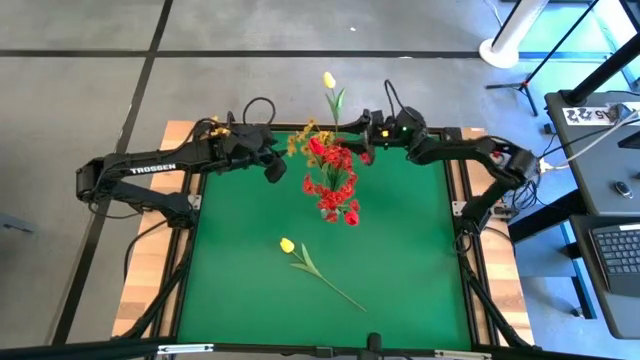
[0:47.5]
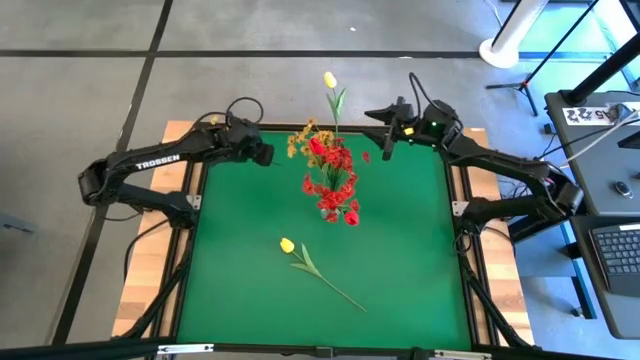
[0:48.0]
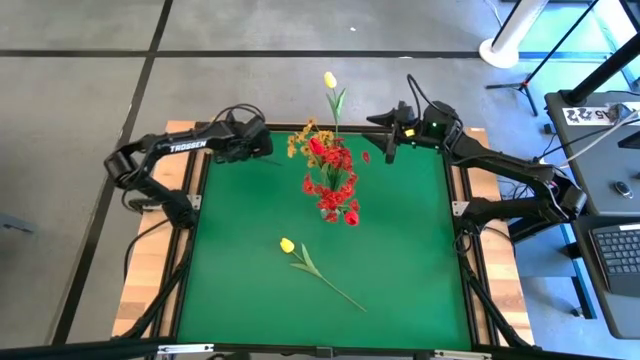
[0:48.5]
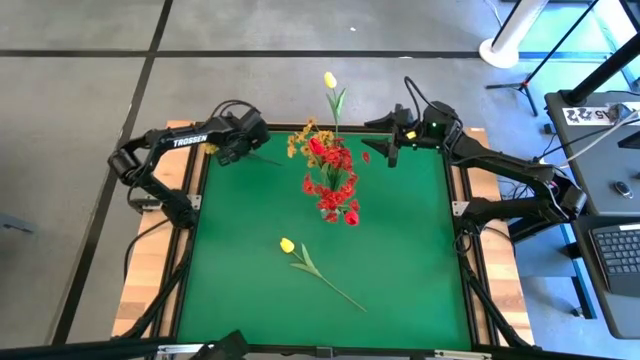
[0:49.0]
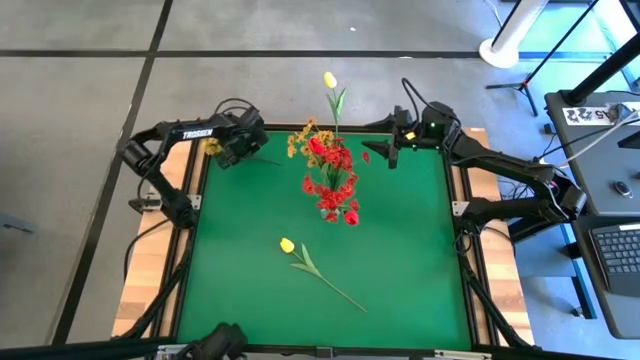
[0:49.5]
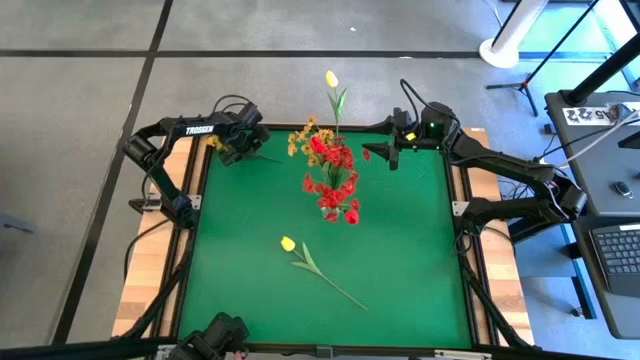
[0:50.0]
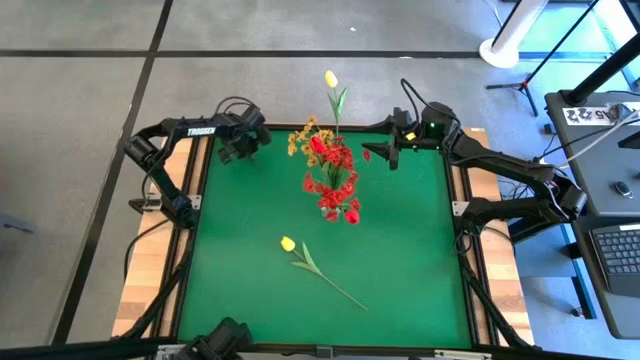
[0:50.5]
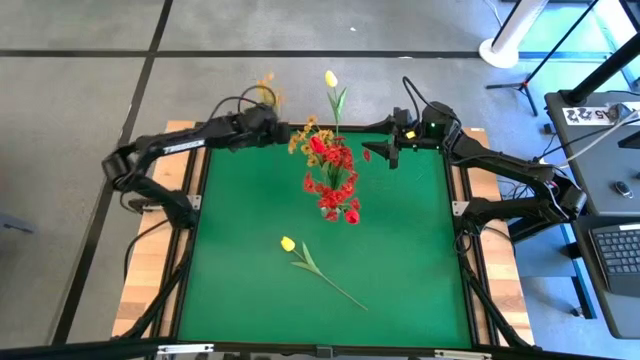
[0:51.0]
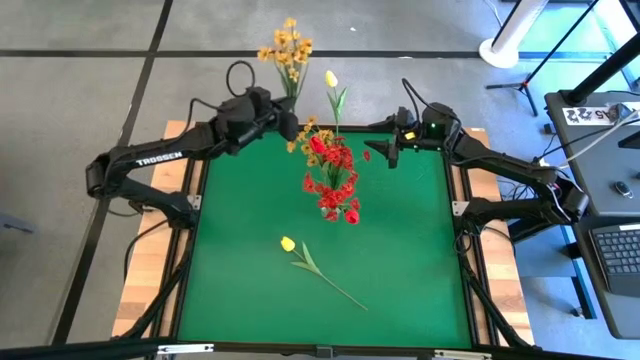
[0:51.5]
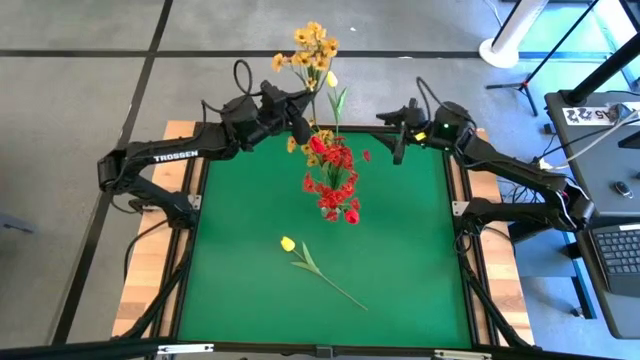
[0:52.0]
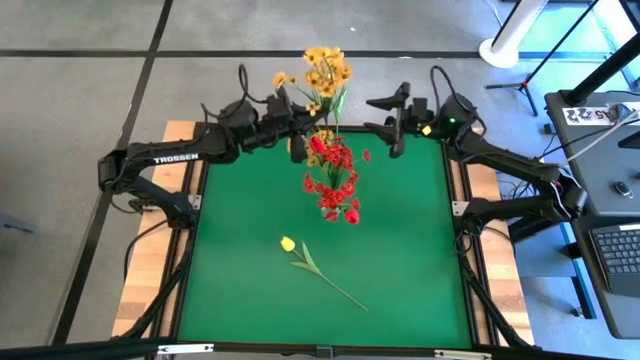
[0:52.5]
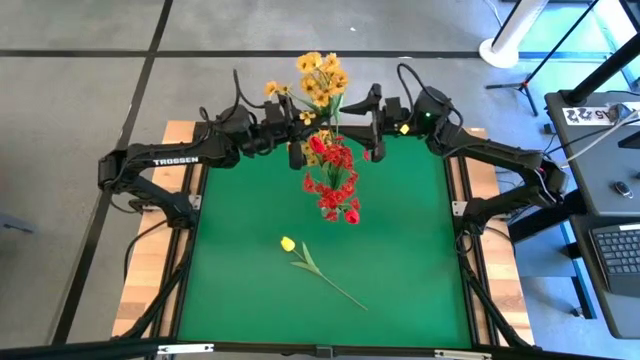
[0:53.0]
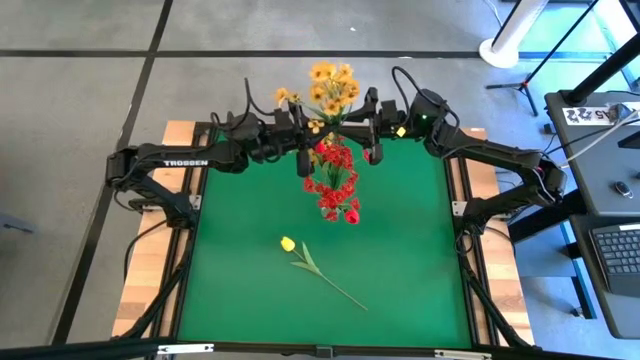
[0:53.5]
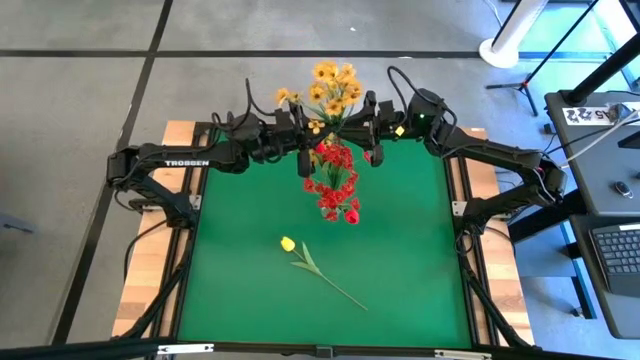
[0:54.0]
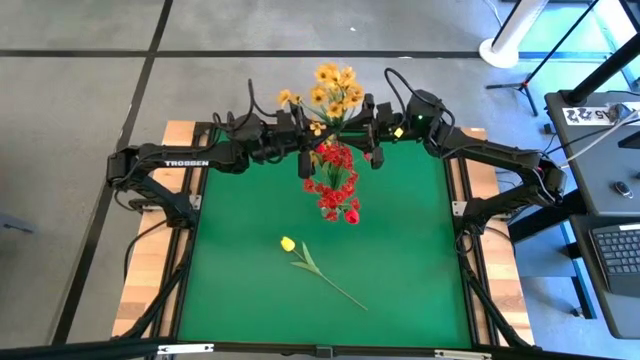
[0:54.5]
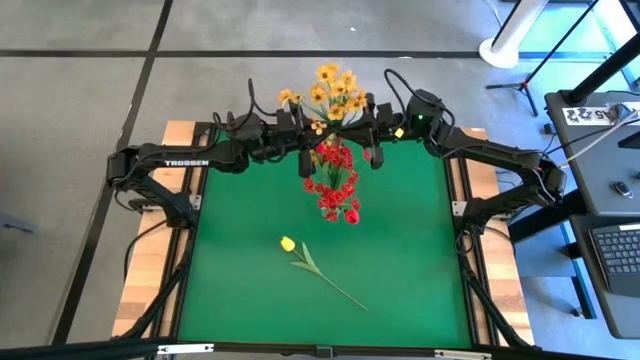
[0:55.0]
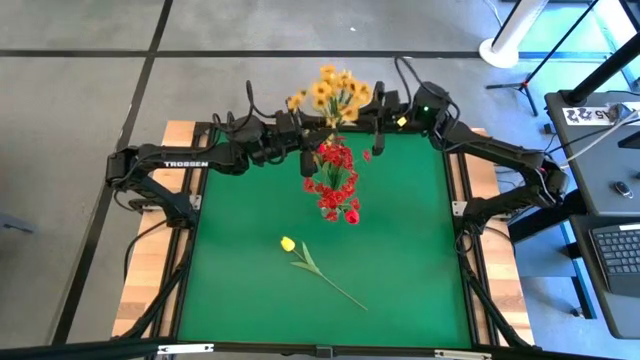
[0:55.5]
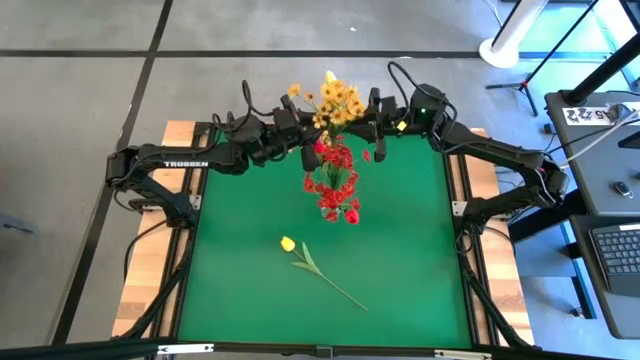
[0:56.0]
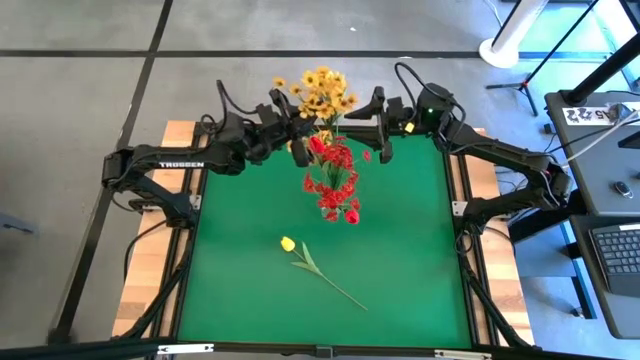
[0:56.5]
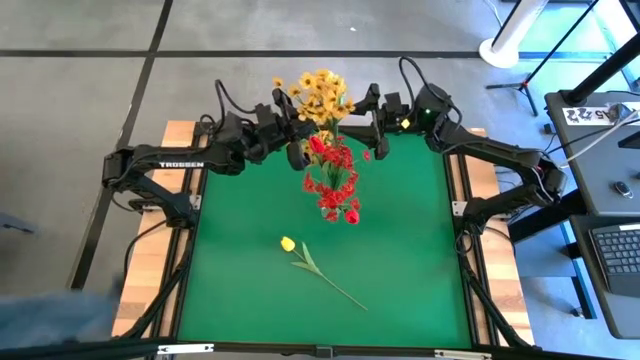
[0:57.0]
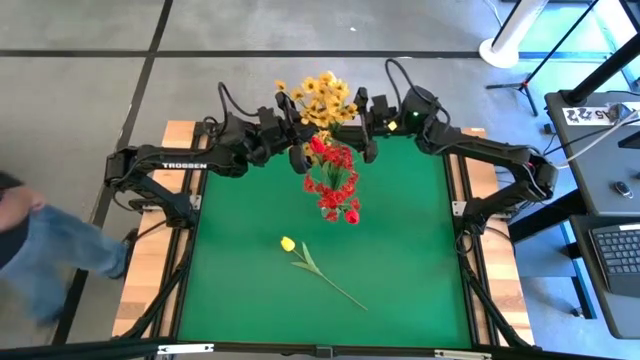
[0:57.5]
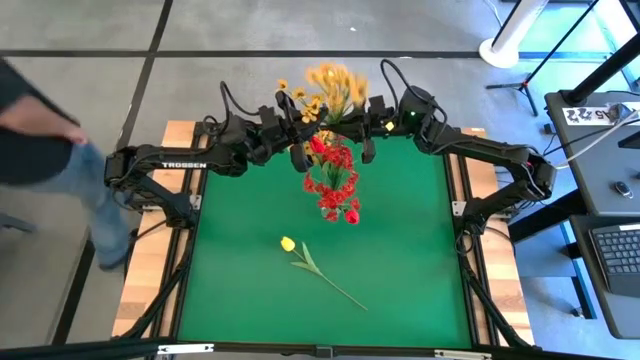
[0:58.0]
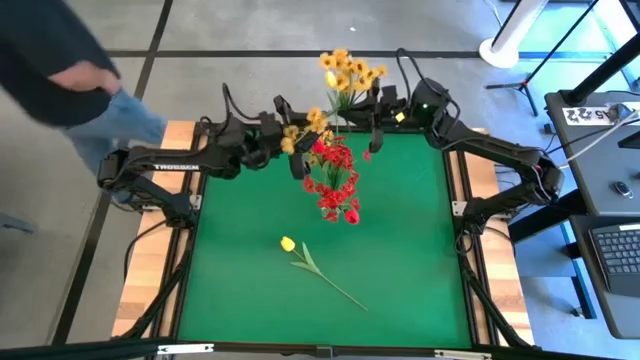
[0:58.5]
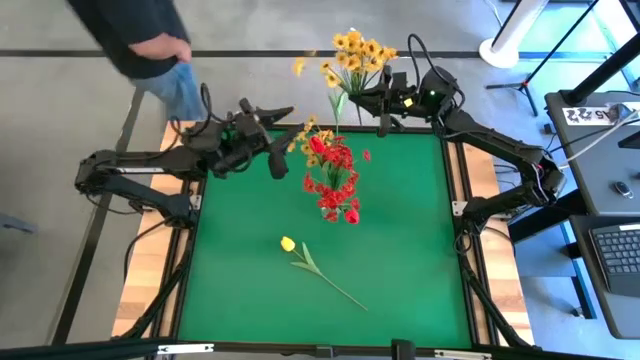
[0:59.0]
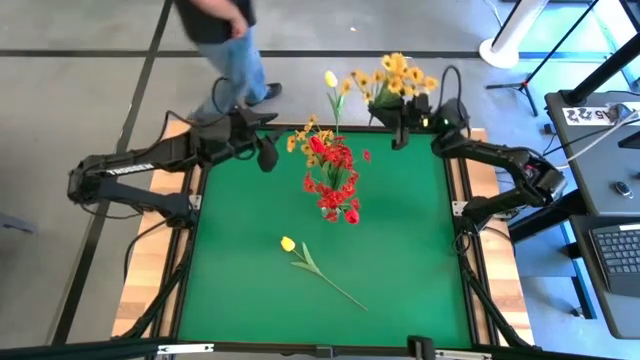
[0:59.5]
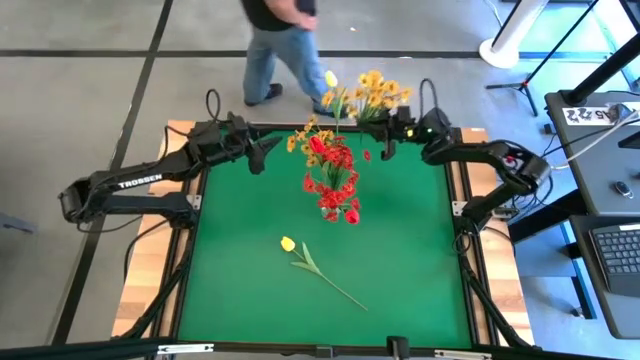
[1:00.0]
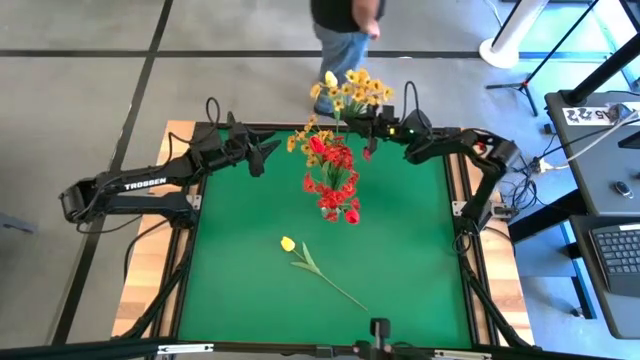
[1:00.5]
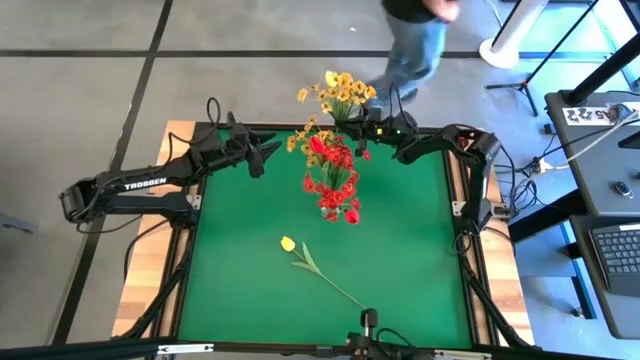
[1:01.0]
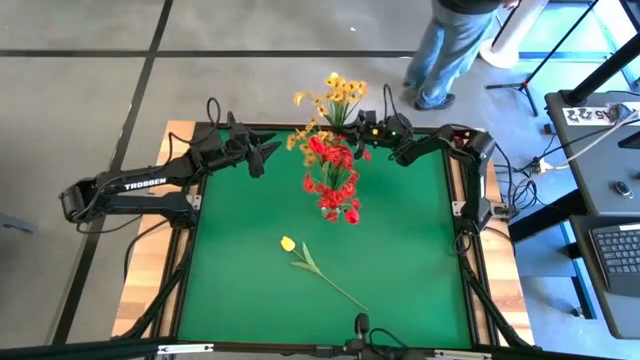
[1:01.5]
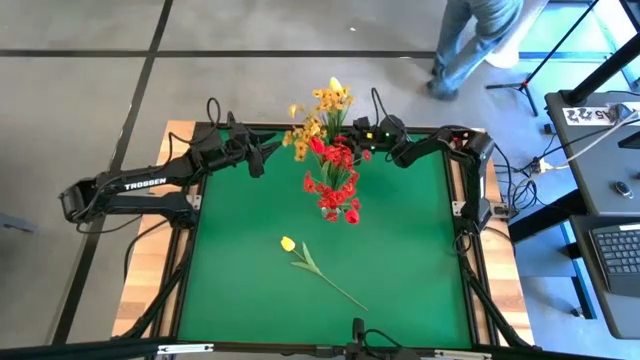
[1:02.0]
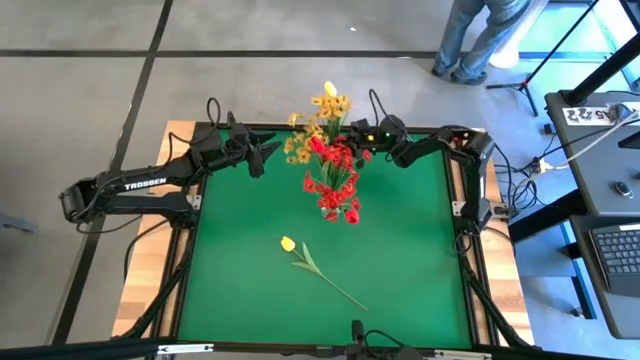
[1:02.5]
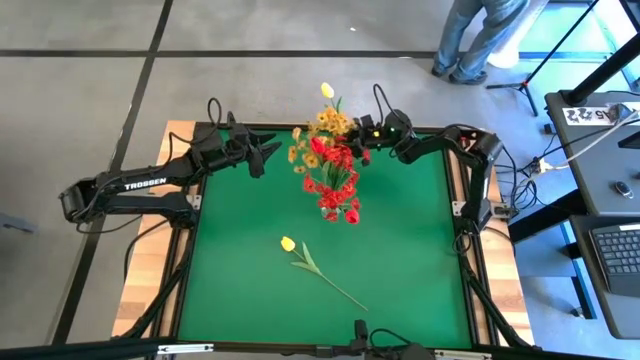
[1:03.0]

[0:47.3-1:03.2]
Task: Sort flowers into vase by color
Put the yellow flowers into the red vase

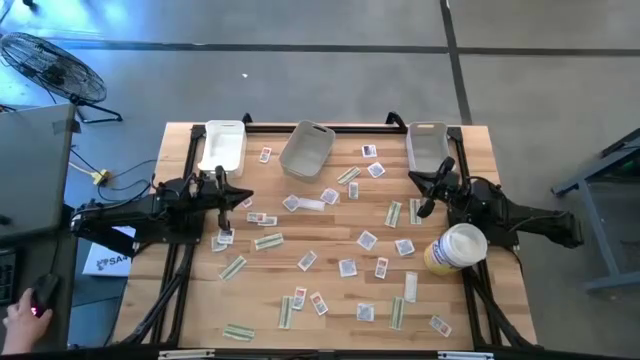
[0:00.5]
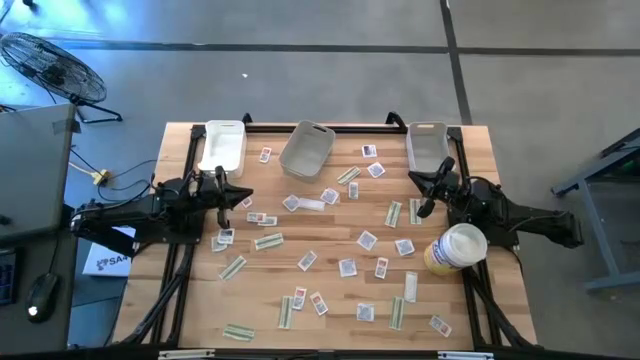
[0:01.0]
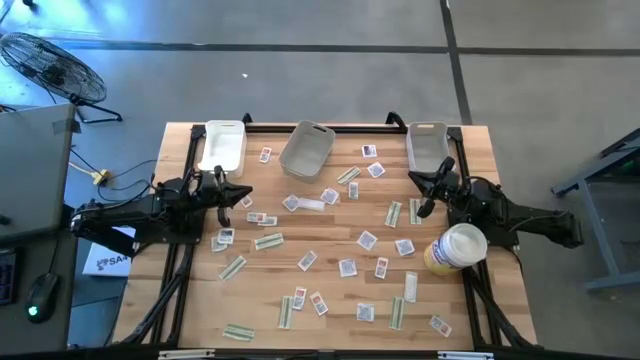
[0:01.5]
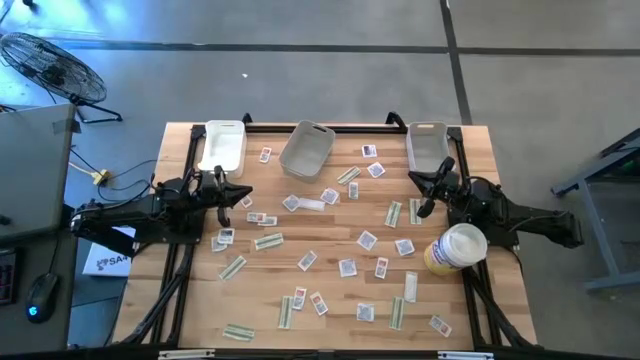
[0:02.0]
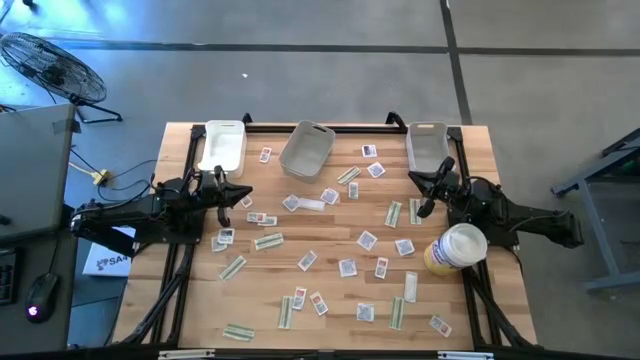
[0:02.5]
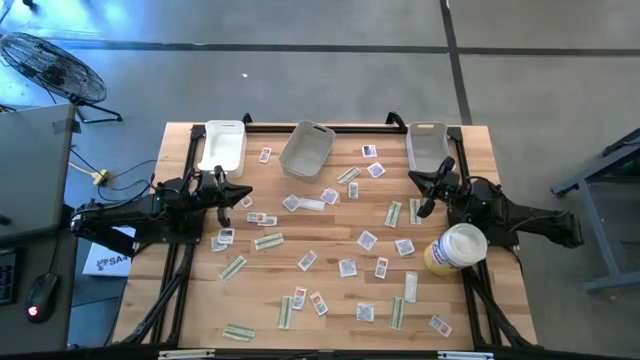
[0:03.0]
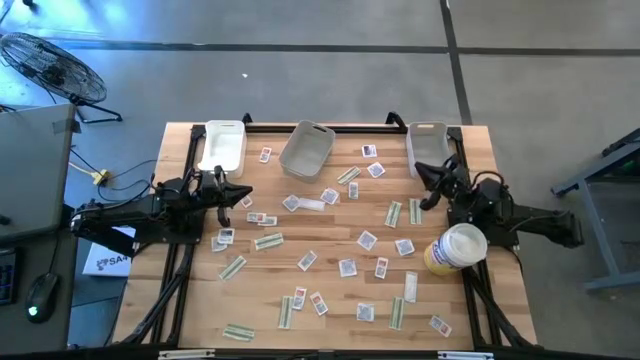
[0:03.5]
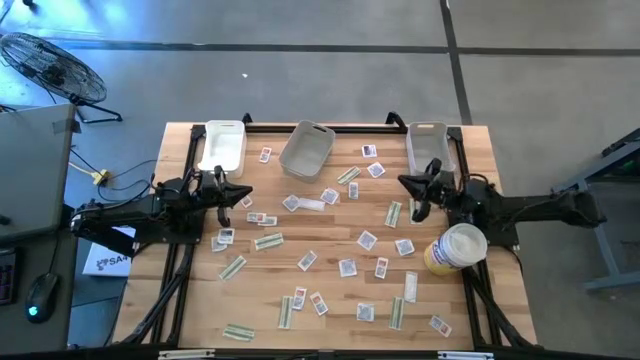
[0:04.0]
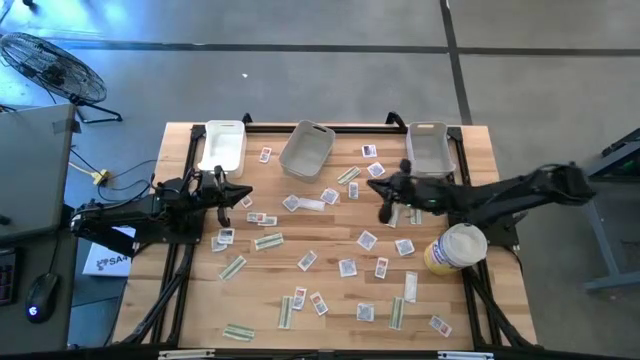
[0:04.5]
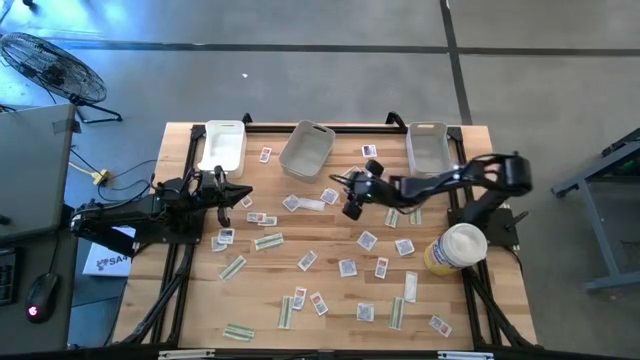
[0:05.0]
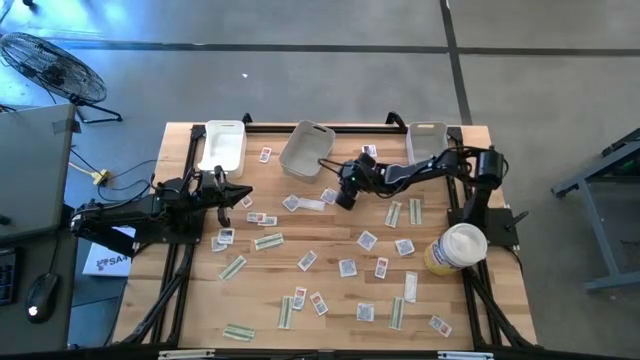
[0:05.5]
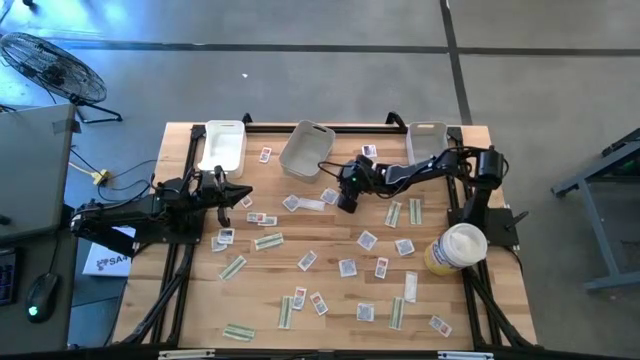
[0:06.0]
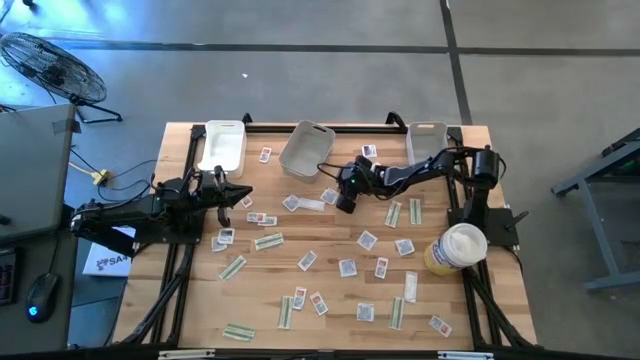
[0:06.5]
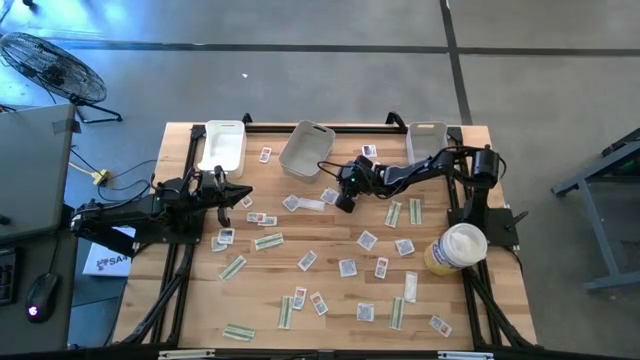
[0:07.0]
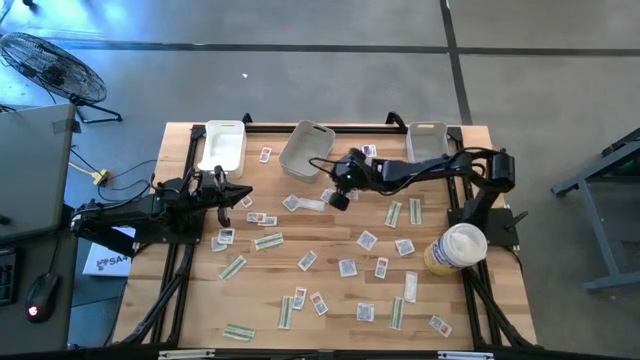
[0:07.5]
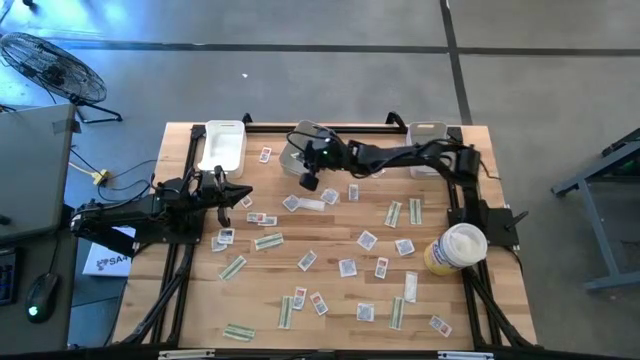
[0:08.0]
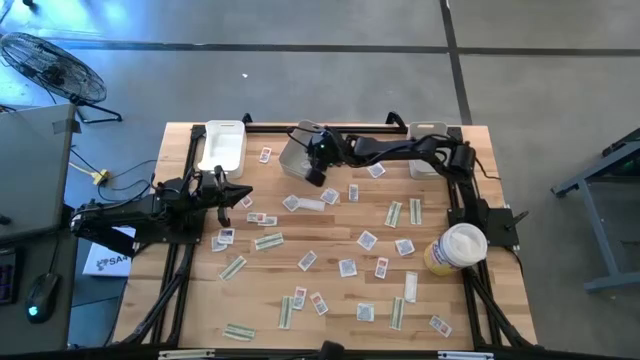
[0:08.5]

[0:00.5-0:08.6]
Task: Pick & Place First Aid Supplies
Put the green pad into the left gray bin
